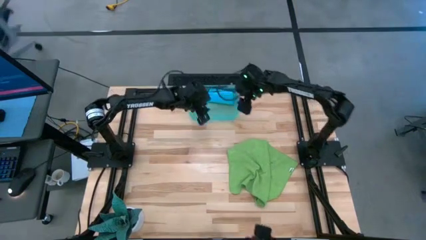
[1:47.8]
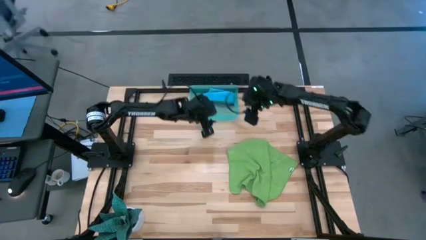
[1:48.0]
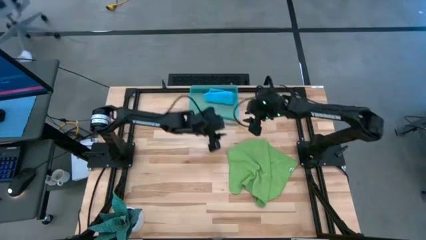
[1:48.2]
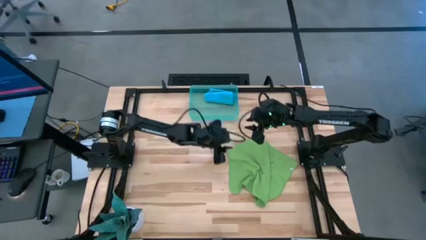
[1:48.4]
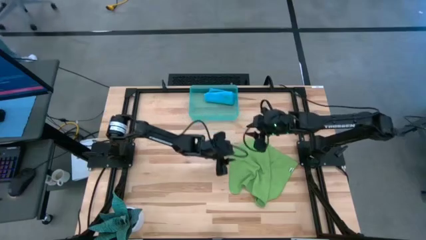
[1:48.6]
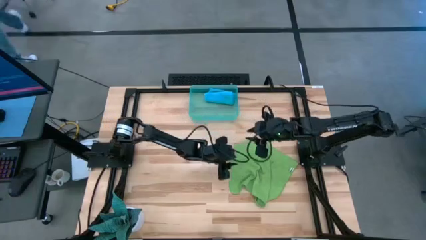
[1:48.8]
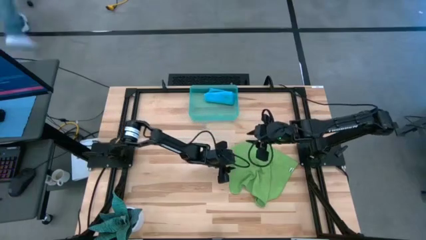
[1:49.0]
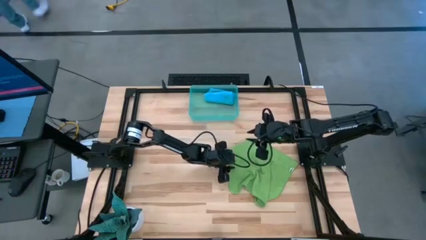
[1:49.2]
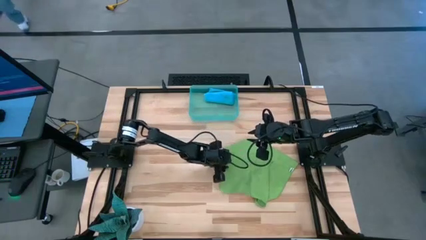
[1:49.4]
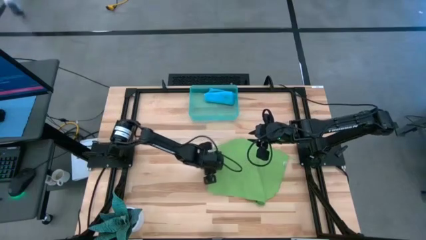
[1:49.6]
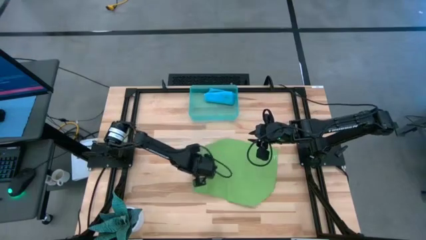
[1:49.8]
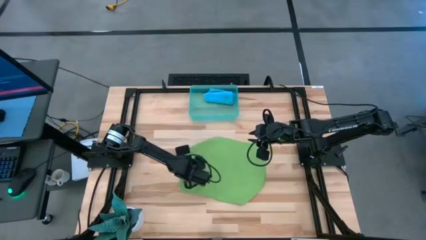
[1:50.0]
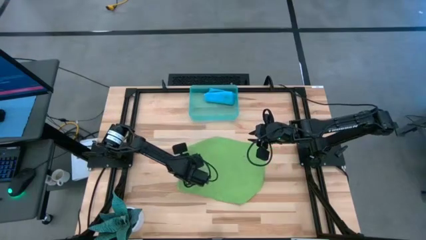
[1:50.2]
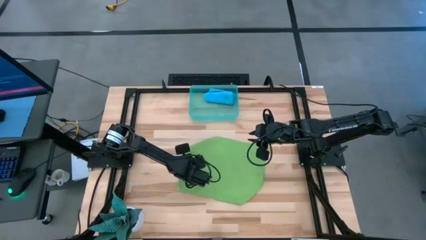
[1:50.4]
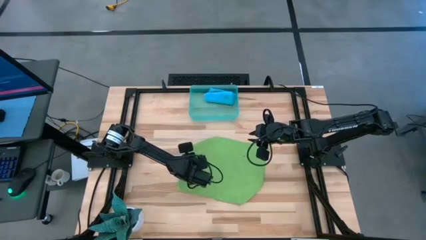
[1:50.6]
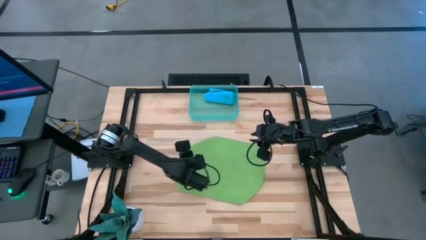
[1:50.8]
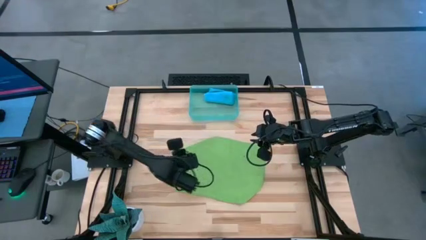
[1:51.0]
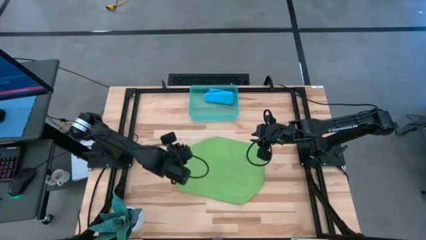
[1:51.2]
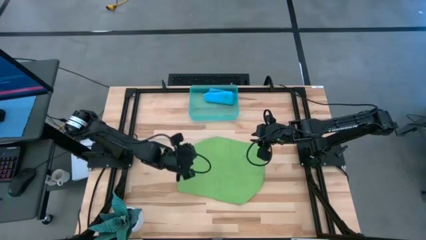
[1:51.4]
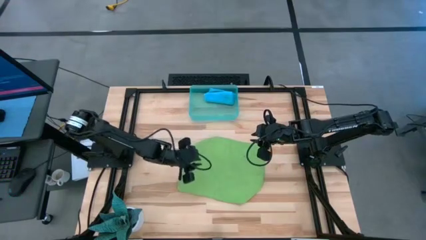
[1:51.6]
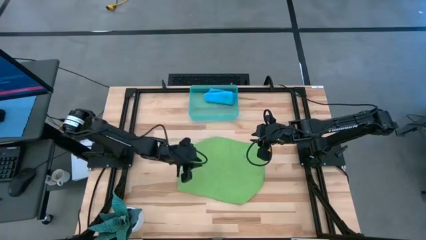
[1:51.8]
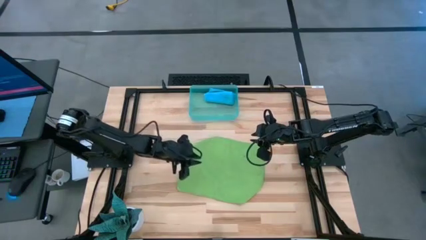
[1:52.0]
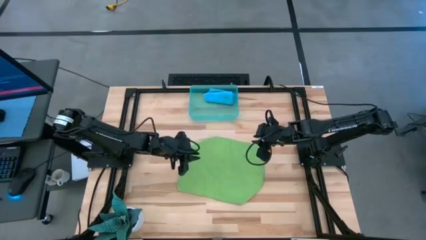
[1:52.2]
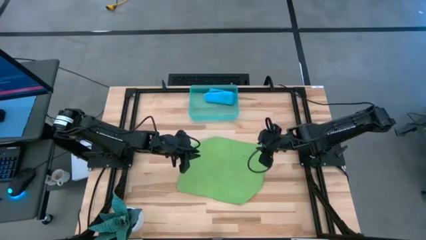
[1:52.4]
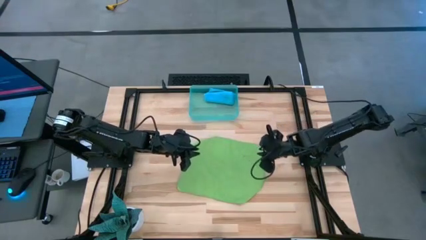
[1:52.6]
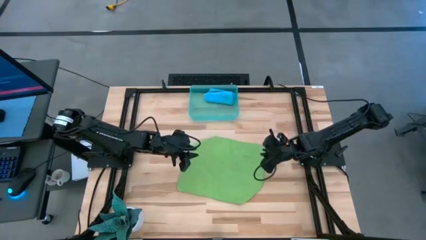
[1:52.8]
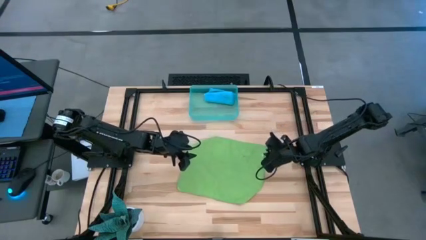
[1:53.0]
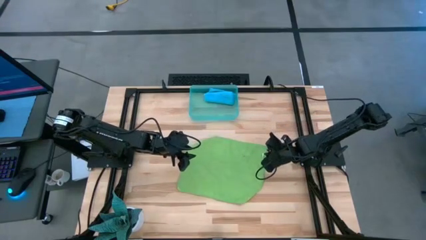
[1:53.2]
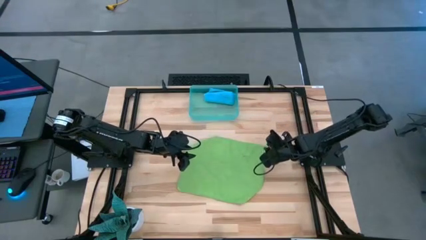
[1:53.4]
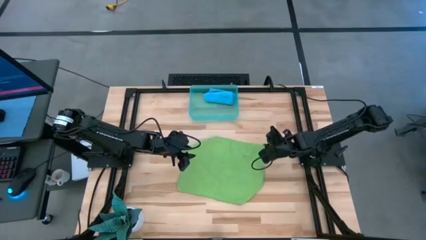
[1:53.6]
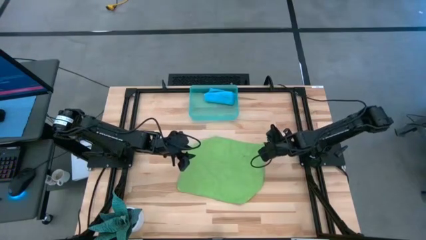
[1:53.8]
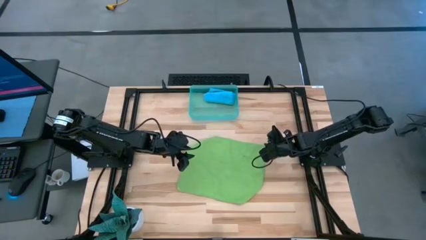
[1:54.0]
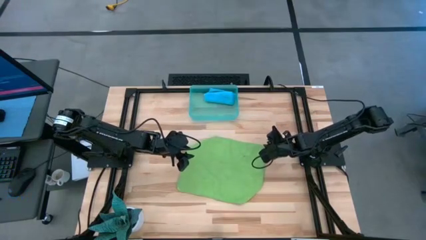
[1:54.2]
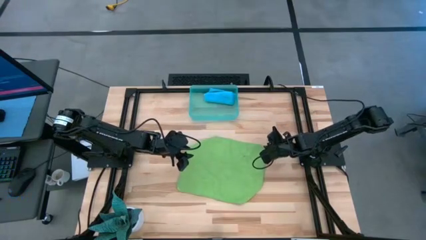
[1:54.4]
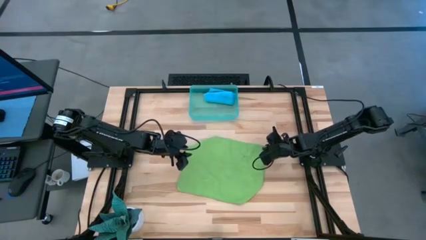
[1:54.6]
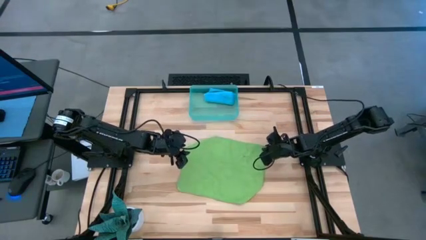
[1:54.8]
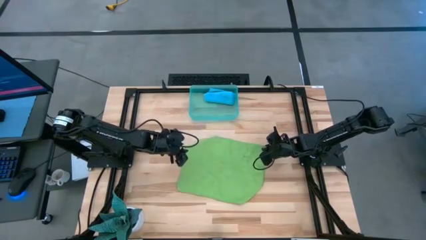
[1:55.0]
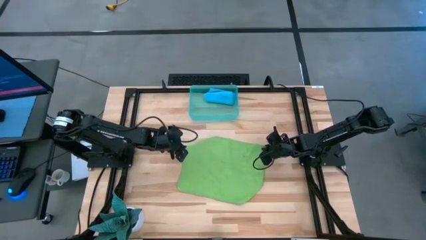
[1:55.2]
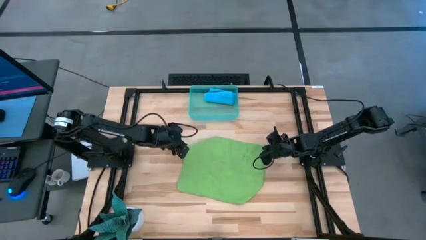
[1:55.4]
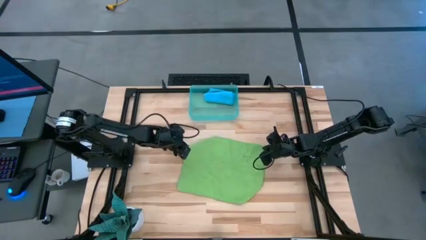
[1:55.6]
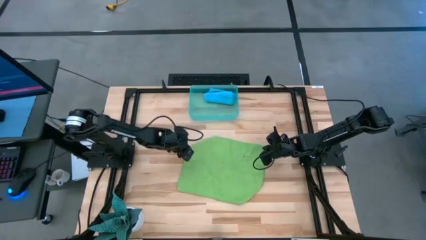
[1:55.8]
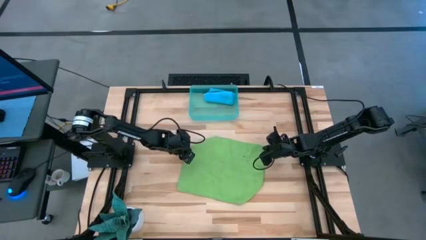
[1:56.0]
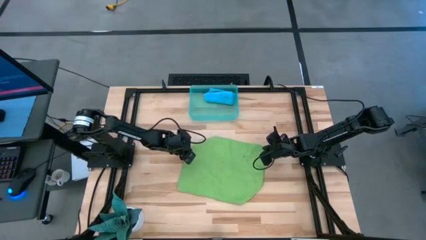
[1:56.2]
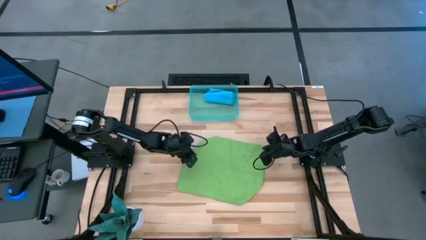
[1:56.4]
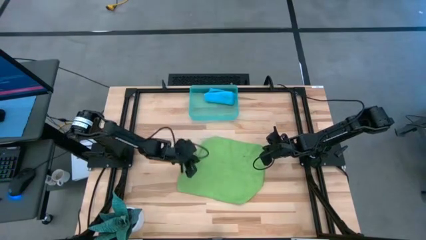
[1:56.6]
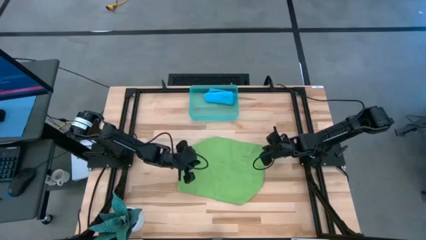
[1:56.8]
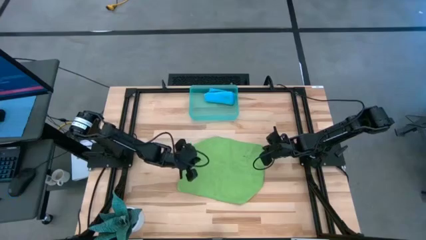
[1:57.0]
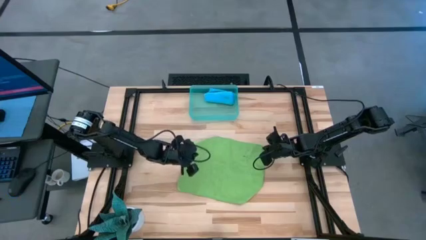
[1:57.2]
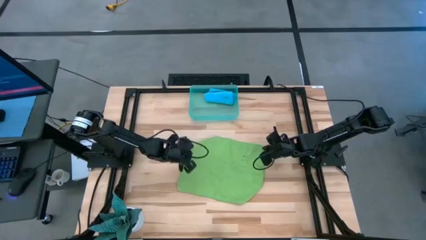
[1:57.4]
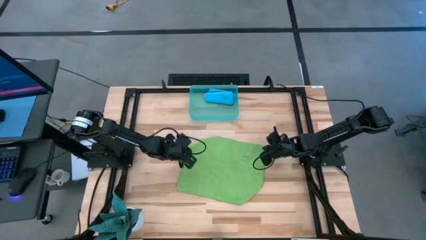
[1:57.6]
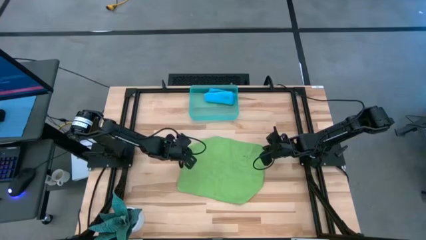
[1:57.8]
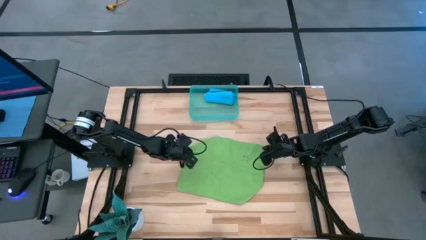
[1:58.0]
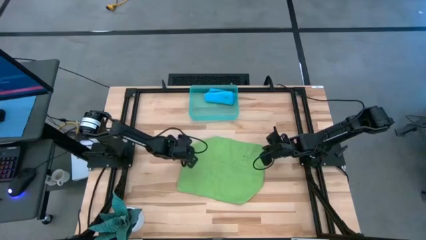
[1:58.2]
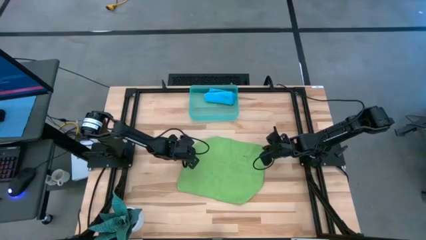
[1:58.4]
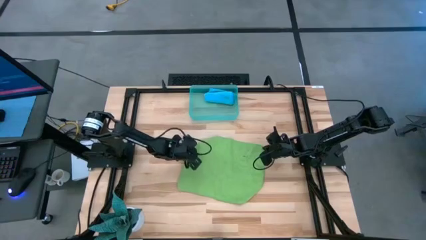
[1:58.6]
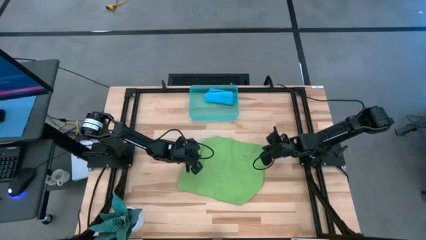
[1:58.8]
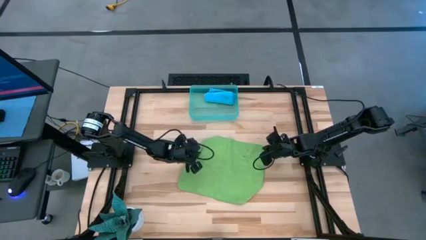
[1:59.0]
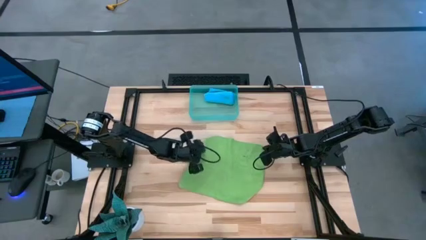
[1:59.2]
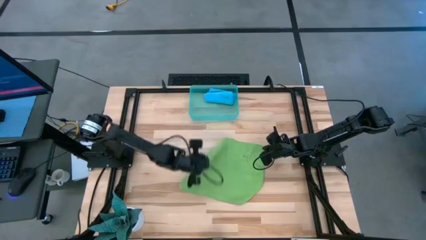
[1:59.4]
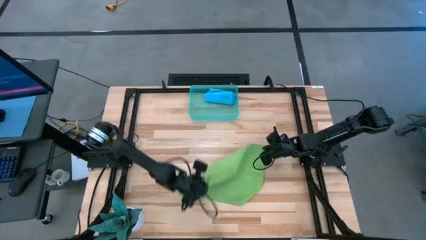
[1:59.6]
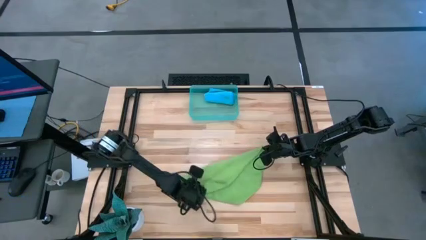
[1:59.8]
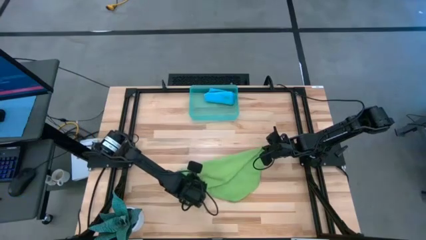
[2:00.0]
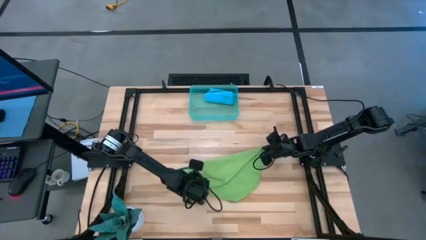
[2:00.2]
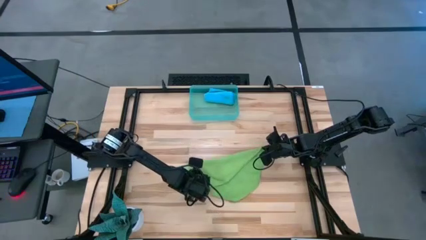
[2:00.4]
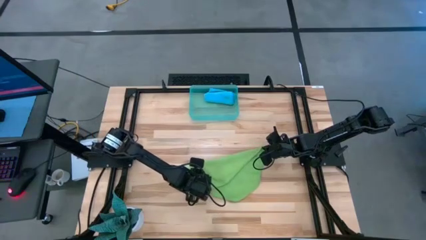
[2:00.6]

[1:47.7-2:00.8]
Task: Roll microfiber towels into tight, uniform cylinder then place into a basket
Fold the green microfiber cloth

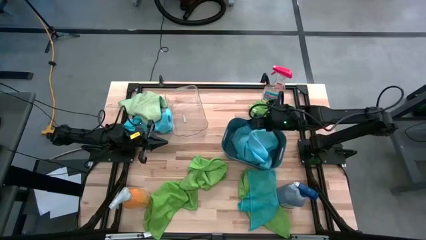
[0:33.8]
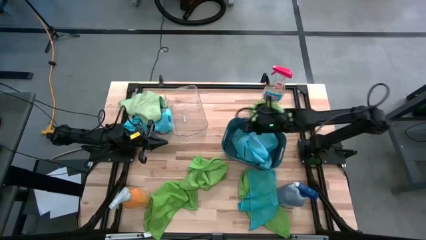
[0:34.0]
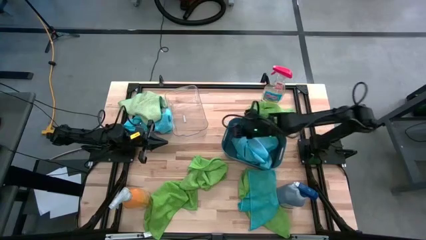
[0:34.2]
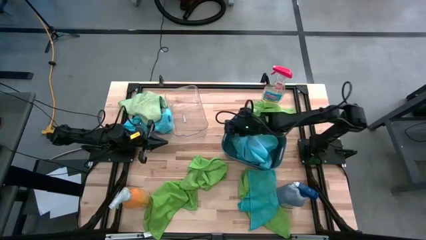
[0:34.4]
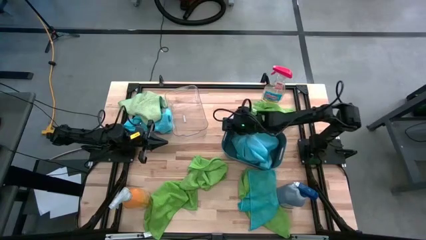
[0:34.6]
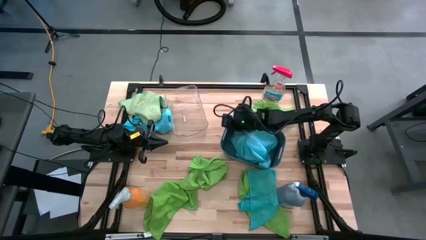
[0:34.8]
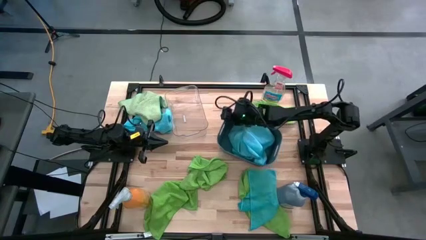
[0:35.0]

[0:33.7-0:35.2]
Task: Sort microfiber towel by color & place in baskets
Adjust the blue bin
